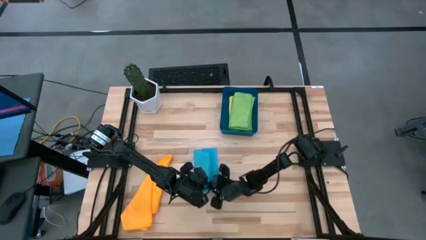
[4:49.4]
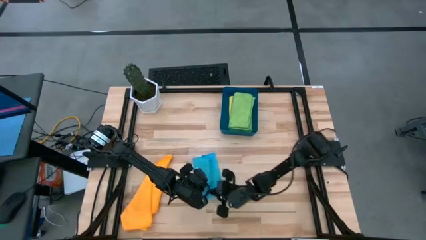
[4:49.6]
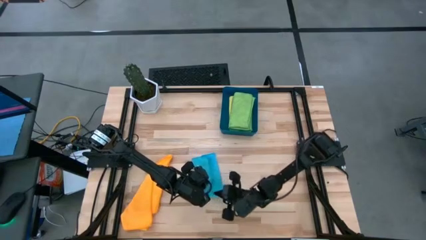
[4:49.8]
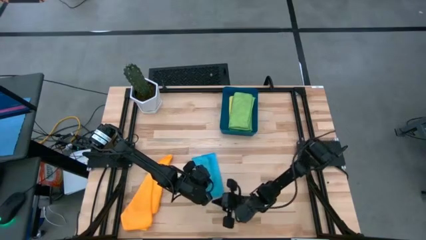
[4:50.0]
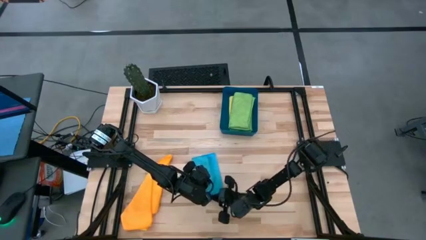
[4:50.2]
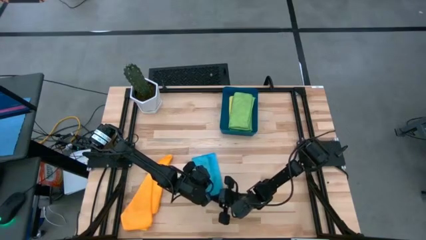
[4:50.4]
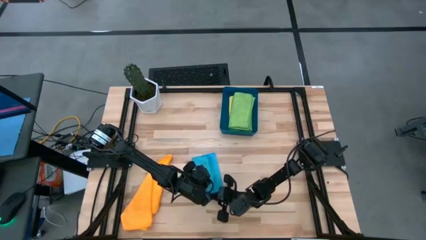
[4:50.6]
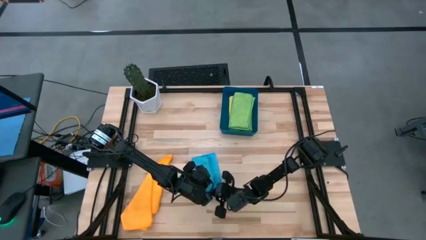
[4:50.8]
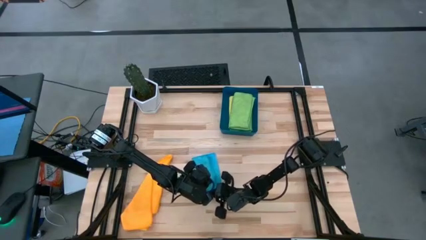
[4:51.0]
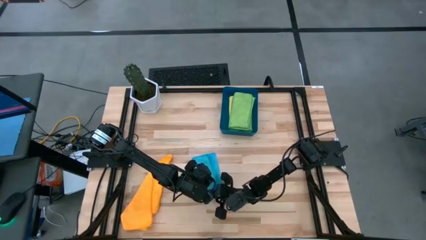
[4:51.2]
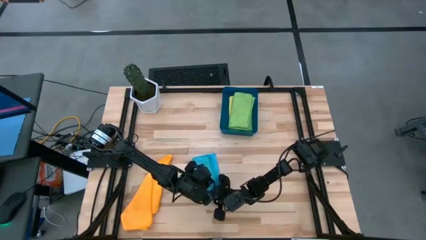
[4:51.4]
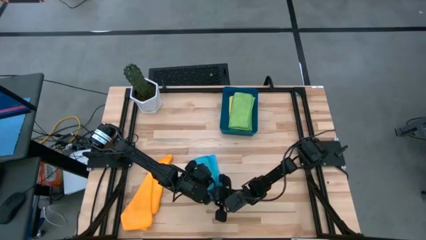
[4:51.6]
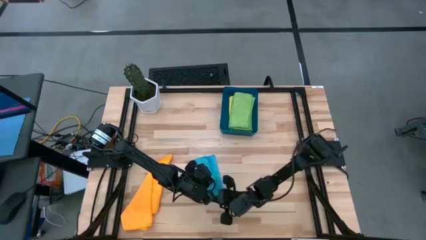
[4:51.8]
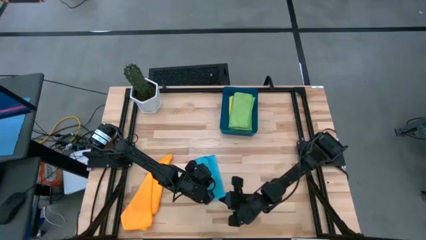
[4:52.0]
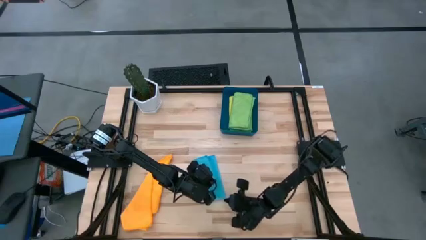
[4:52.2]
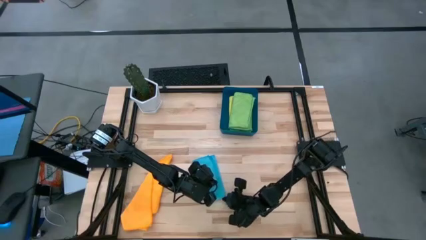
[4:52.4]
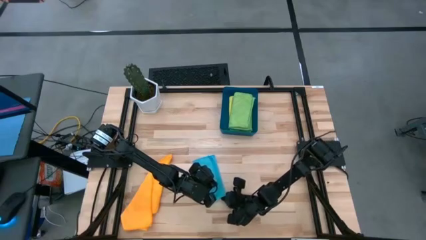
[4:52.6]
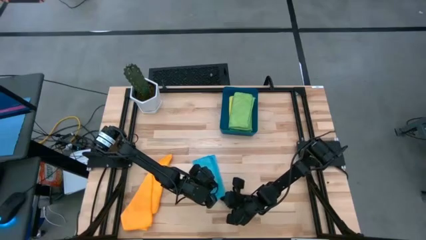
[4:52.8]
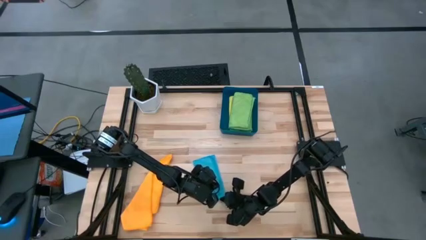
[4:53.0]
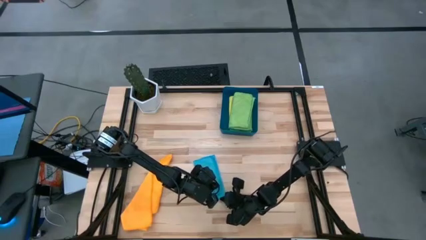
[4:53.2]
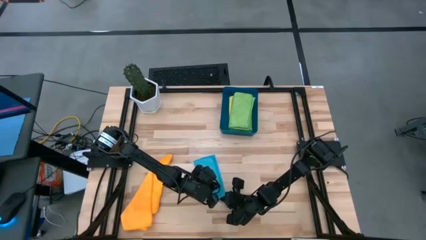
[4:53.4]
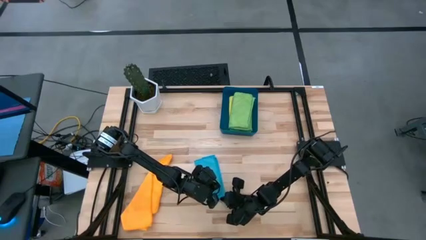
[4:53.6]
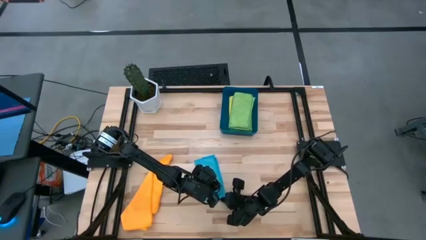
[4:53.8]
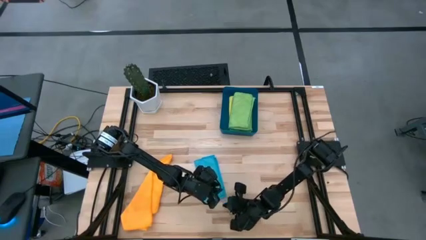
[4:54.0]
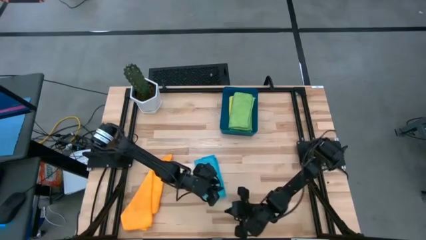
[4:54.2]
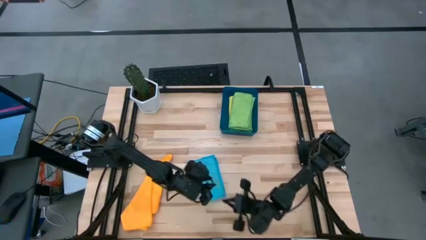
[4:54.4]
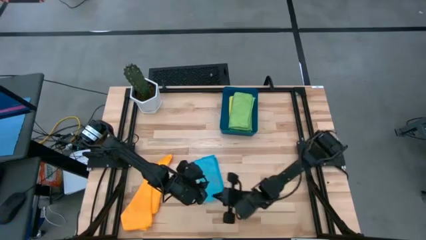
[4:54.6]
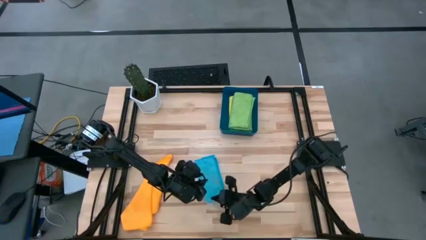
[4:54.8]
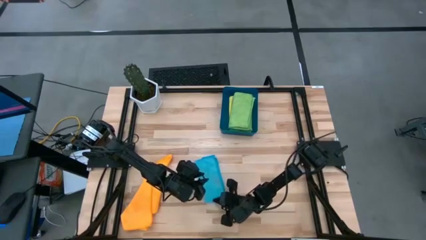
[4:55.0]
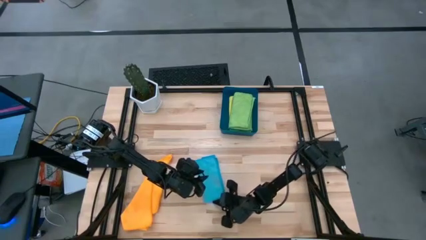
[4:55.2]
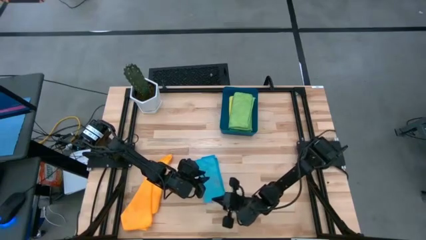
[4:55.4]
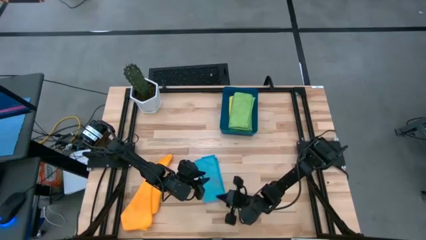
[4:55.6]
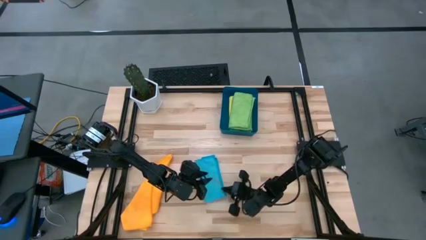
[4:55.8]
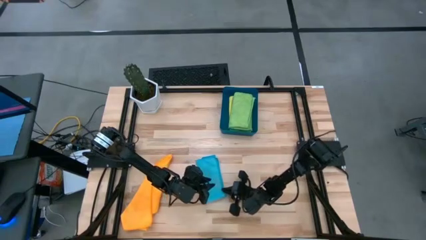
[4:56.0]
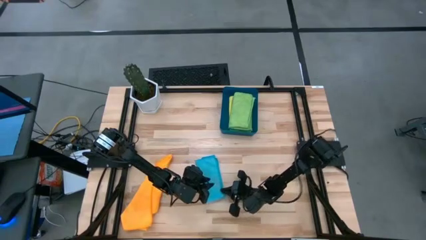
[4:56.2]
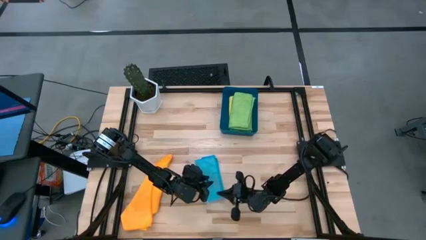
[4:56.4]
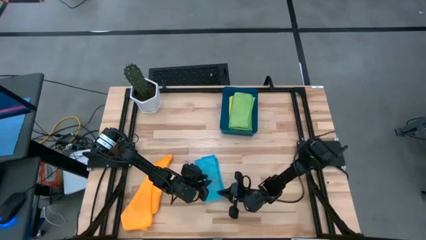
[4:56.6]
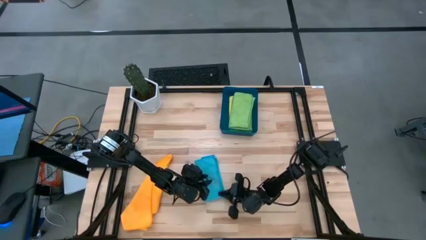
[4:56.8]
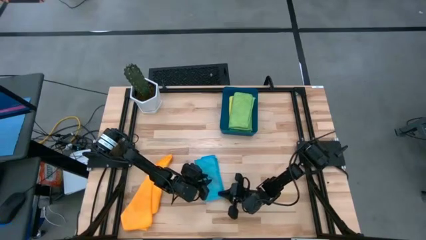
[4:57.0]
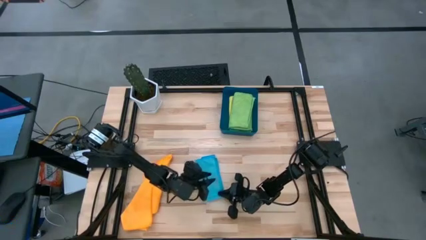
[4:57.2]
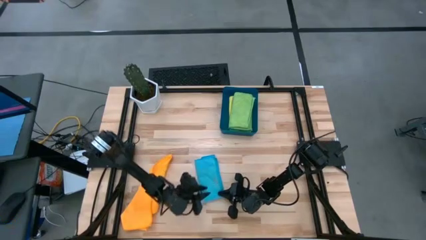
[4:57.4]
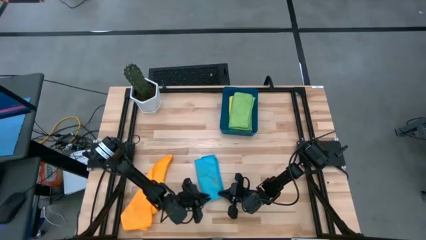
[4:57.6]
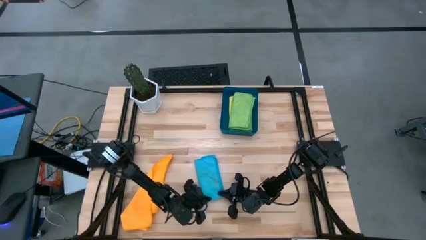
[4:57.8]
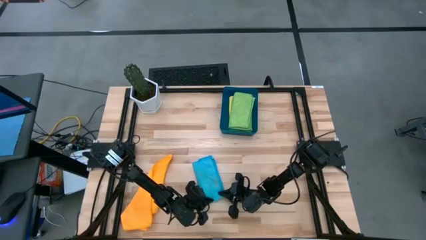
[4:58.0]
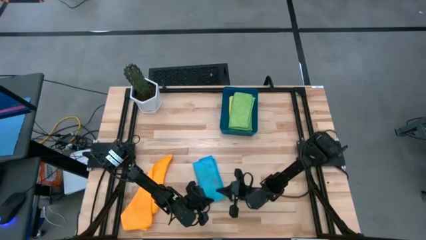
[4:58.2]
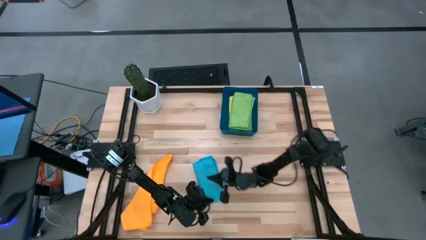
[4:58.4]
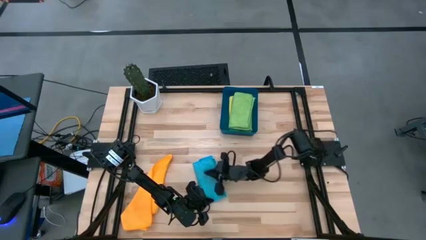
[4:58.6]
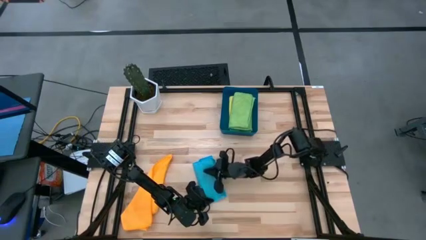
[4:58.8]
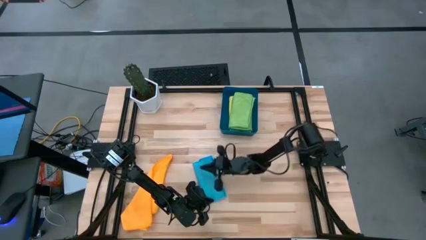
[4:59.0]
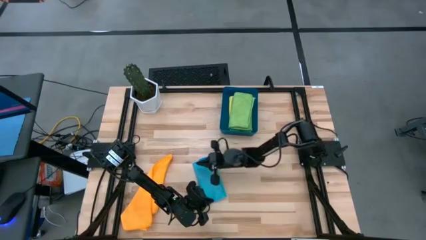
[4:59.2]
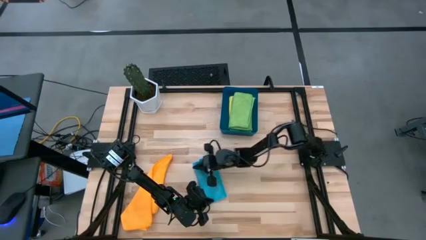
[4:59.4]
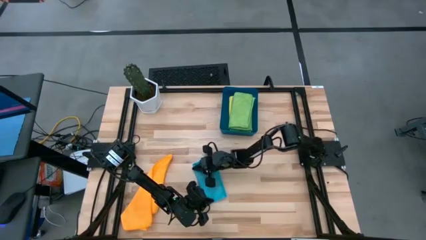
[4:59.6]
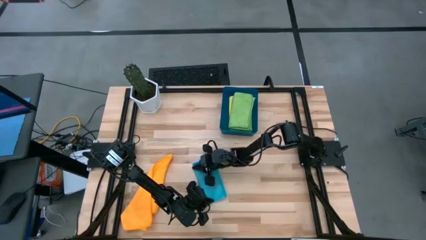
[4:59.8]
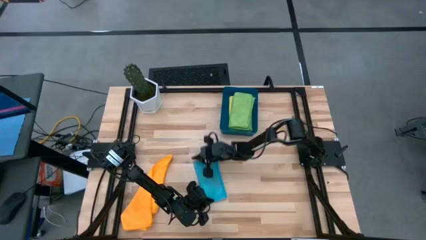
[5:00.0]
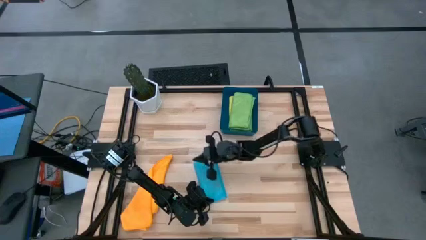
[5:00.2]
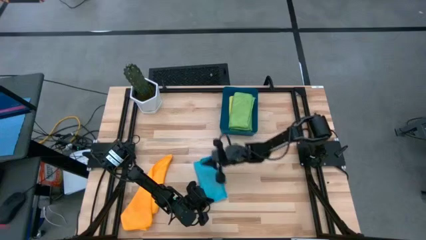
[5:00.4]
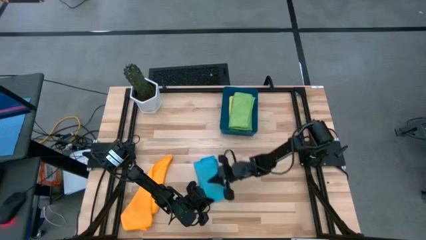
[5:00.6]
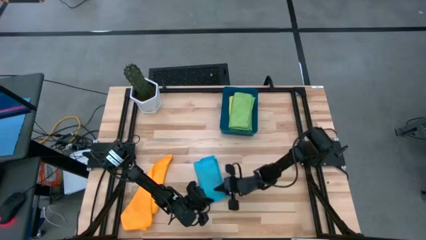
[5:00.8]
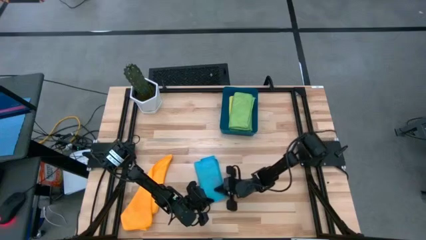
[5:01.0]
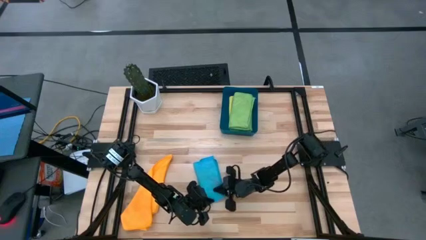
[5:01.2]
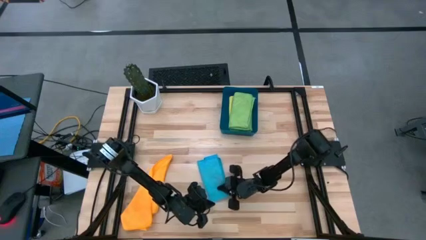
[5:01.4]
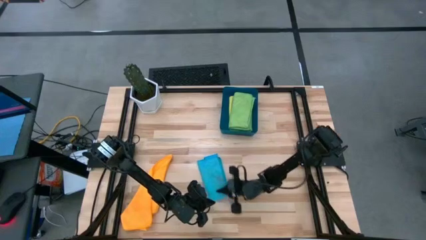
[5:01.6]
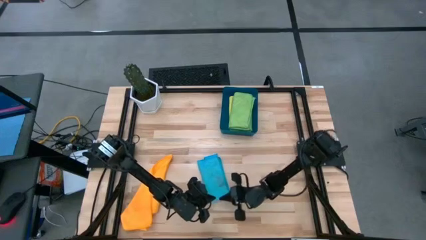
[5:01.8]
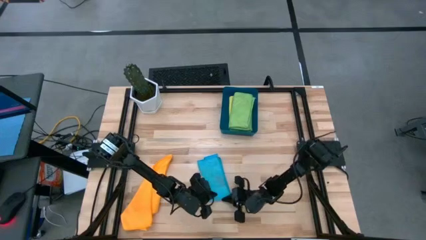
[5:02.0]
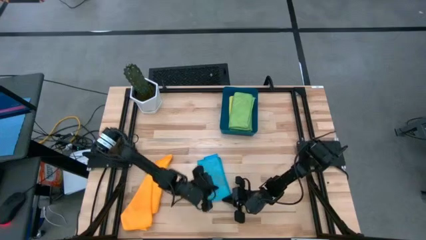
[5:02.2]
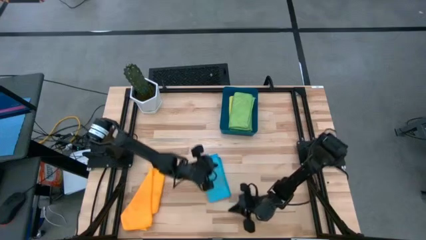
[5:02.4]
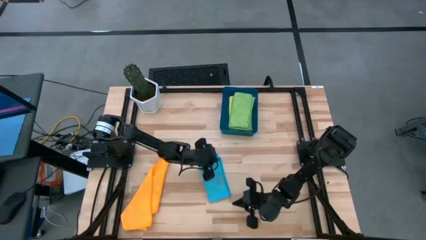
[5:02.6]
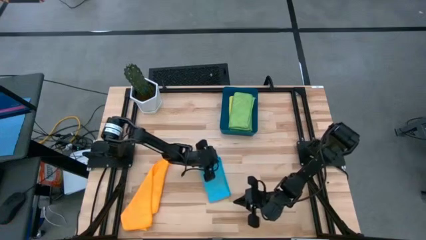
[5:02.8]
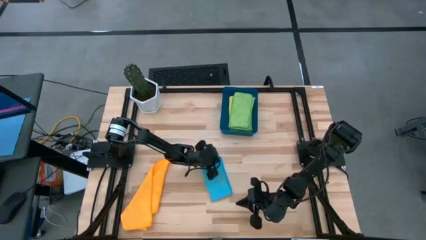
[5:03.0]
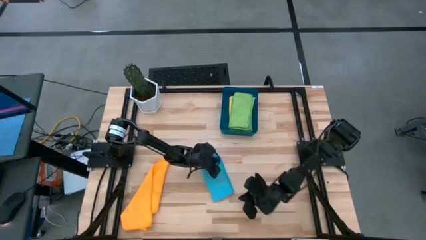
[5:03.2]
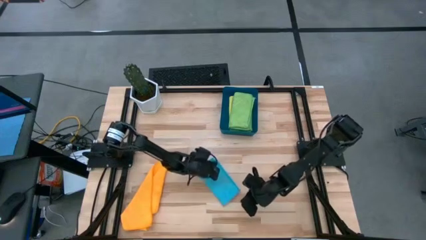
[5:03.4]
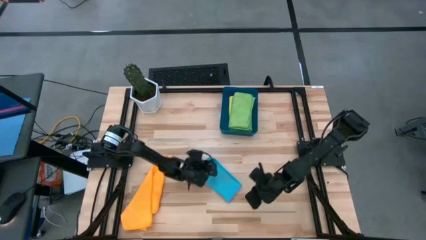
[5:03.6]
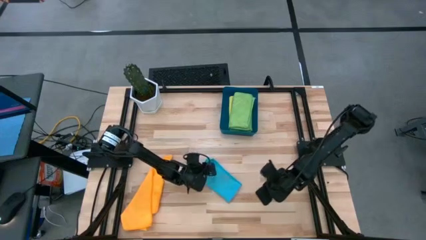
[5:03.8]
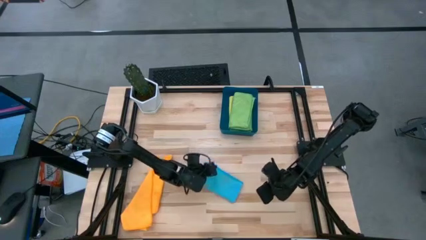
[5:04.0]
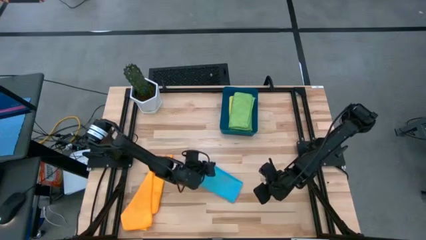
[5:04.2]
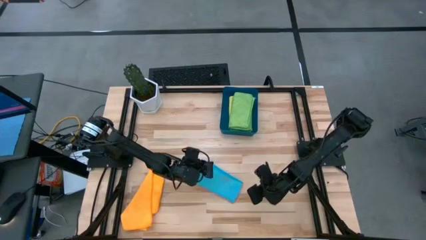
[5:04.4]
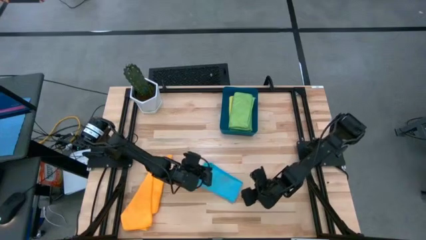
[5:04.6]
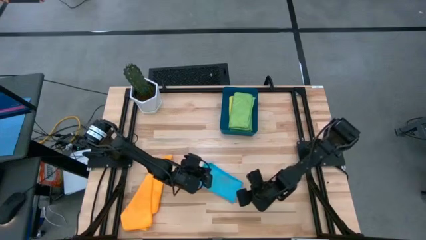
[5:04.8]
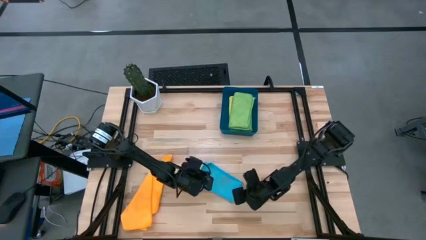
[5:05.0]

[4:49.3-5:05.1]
Task: Fold microfiber towels
Fold the blue towel

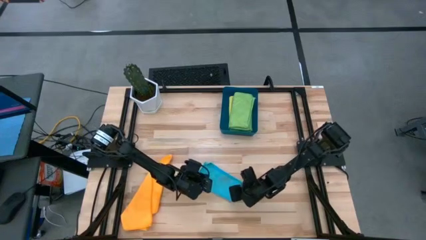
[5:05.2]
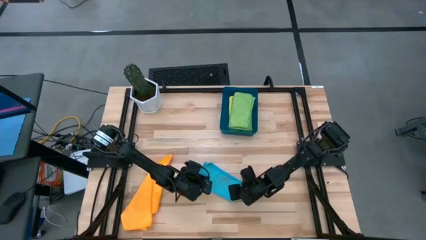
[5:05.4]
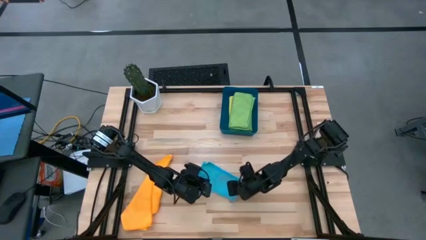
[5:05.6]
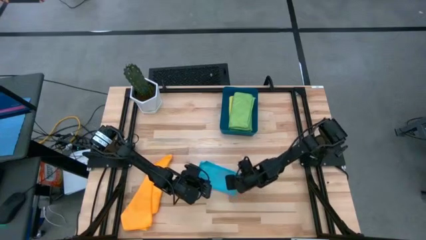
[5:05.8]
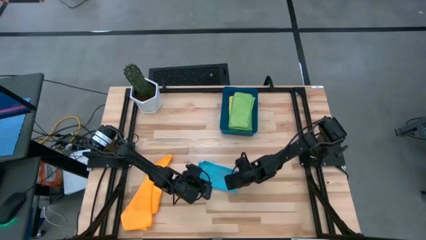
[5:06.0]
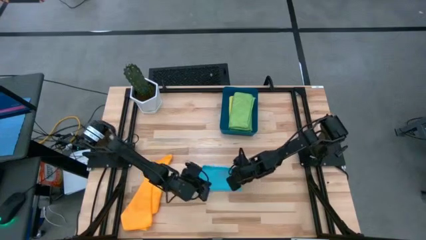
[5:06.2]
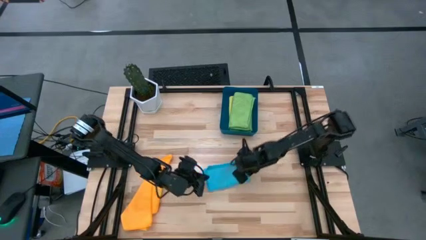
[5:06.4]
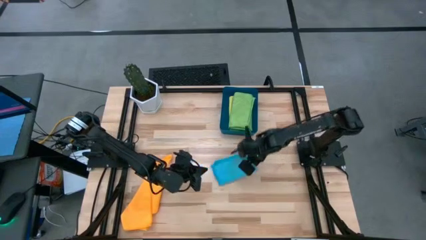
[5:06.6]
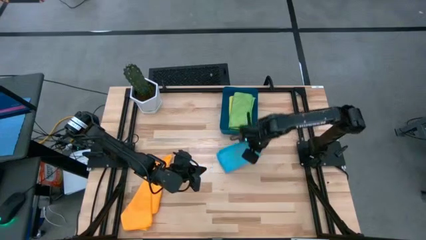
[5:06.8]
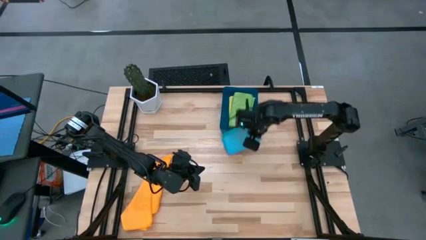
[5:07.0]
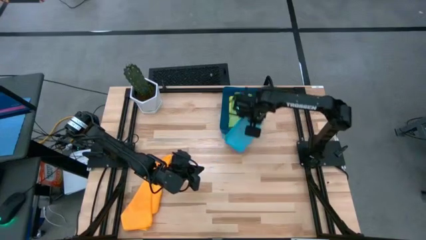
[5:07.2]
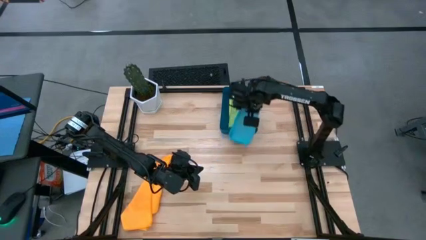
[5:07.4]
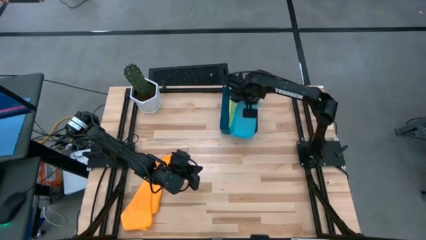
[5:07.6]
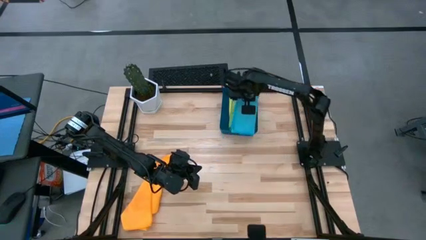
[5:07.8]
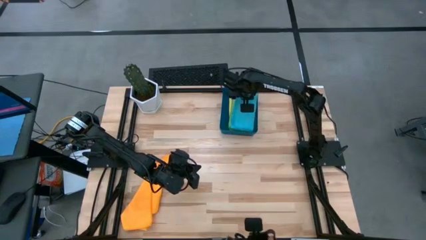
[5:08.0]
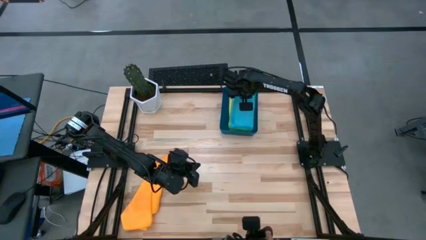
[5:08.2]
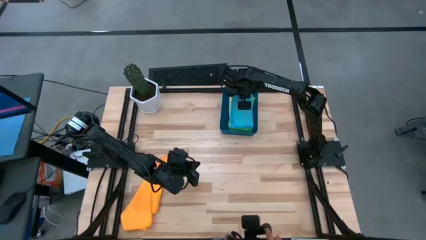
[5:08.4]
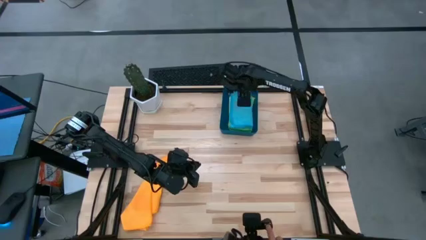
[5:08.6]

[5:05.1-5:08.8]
Put the blue towel into the blue bin
